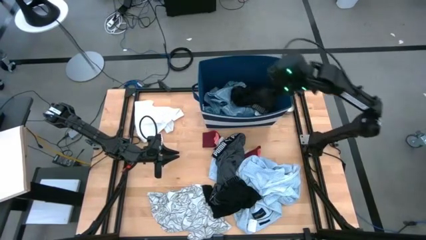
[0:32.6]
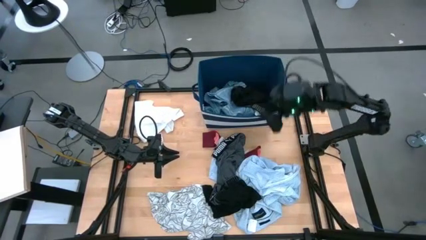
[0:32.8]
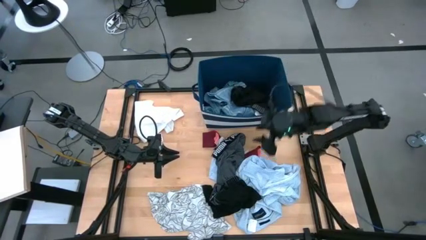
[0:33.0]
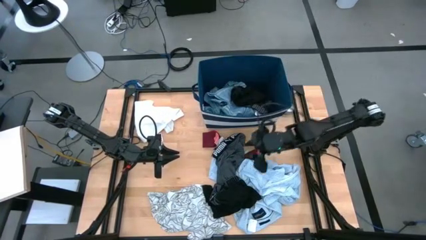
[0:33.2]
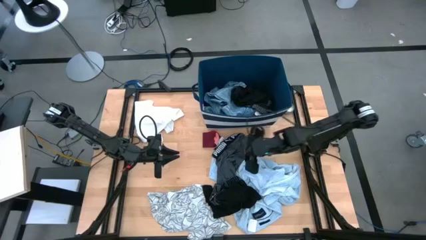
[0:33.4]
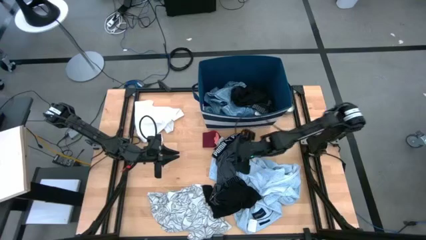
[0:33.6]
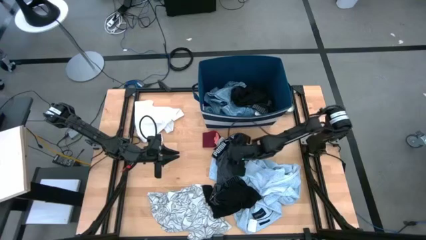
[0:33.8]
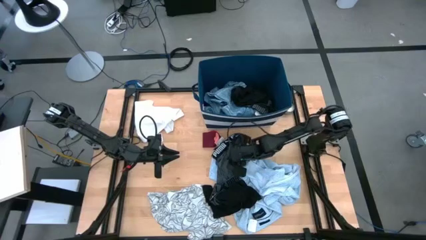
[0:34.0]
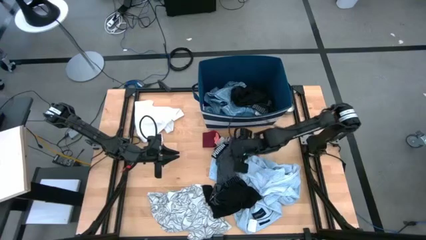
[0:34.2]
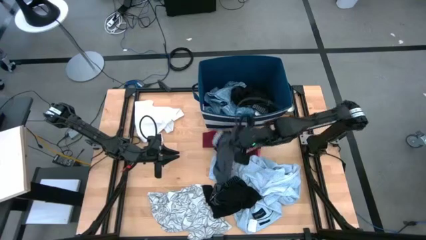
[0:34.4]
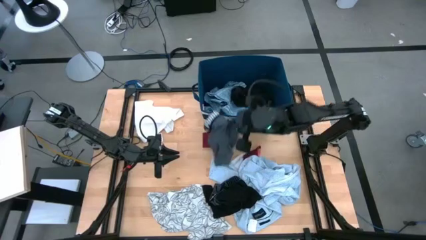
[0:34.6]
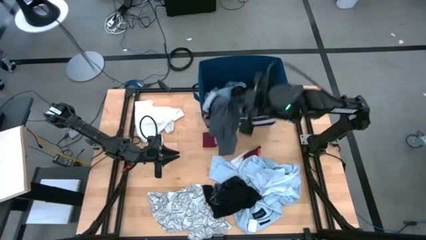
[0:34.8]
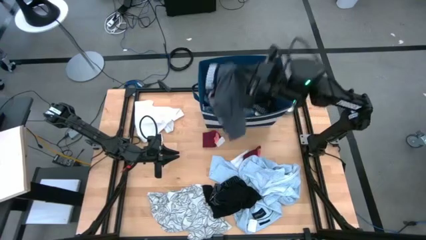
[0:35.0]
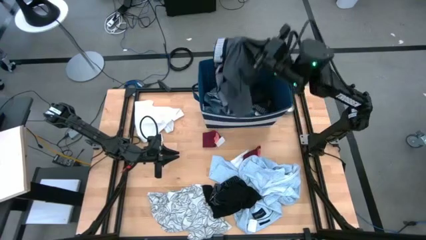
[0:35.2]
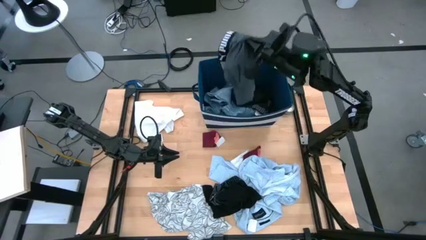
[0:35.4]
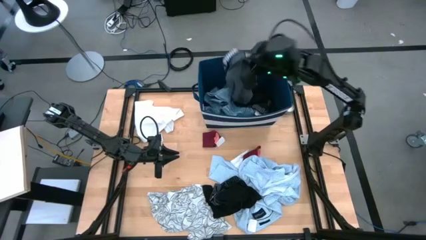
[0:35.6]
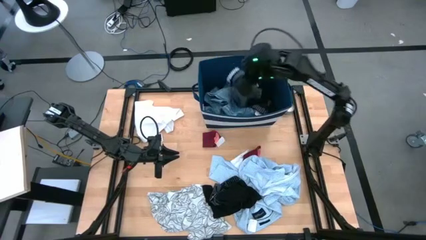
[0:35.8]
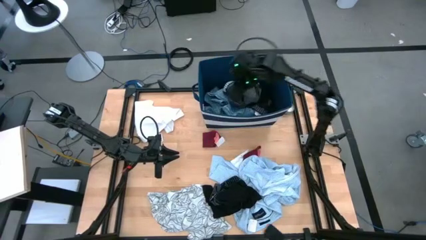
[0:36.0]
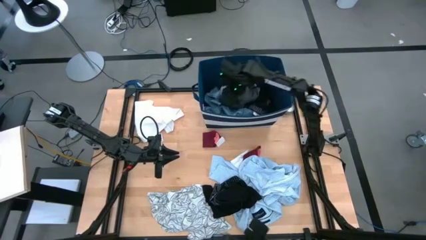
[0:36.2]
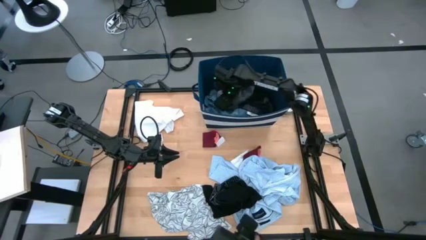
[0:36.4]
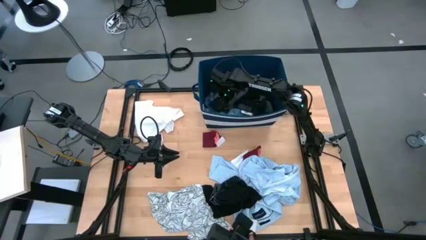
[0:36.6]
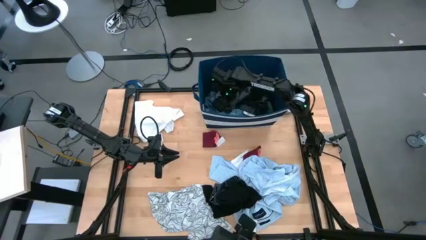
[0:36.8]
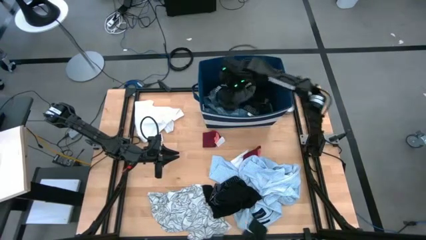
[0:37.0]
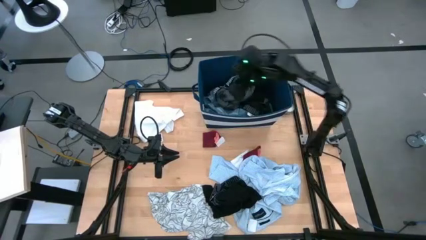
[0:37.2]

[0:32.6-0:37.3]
Task: Sort clothes
Put the gray boxer into the blue bin

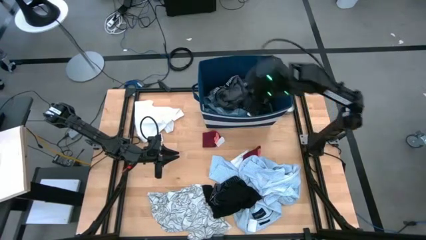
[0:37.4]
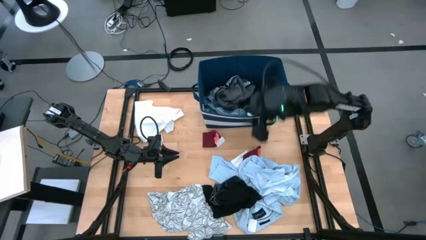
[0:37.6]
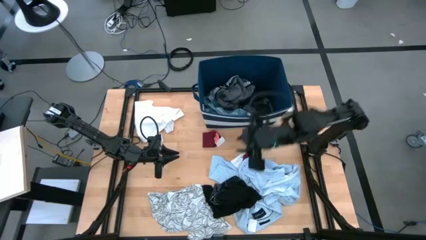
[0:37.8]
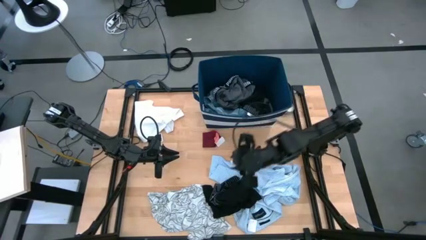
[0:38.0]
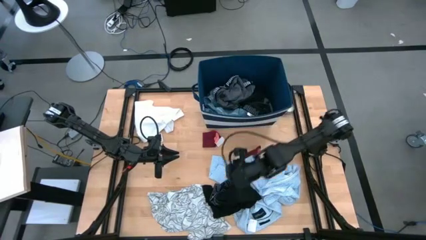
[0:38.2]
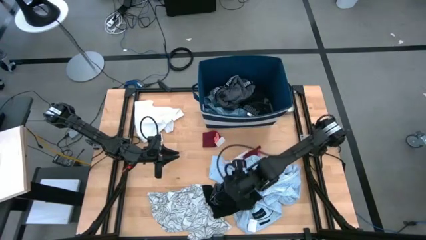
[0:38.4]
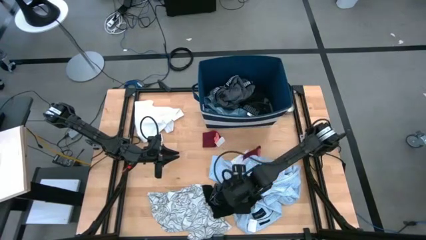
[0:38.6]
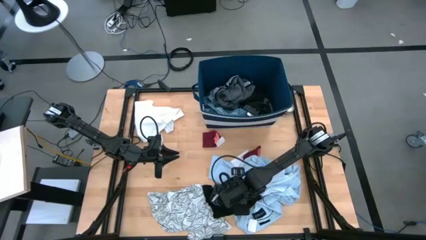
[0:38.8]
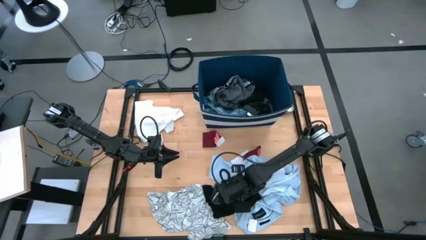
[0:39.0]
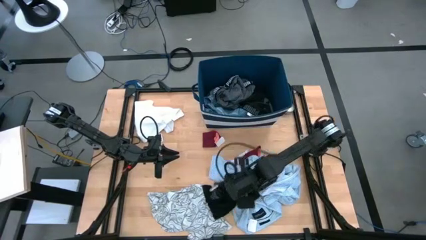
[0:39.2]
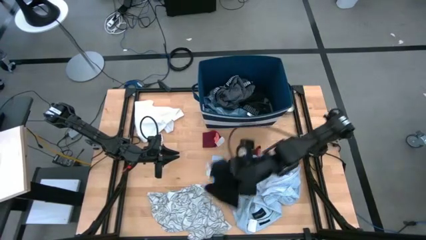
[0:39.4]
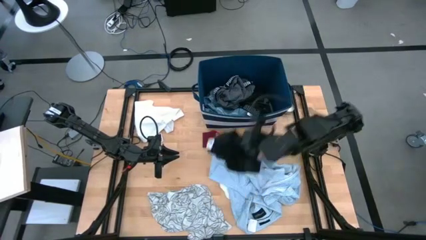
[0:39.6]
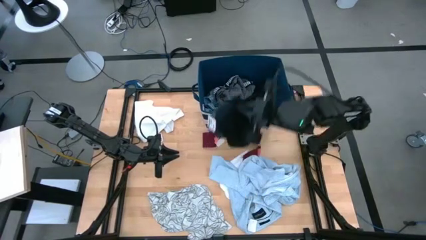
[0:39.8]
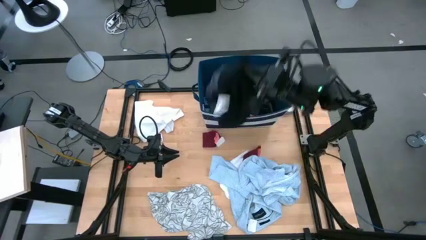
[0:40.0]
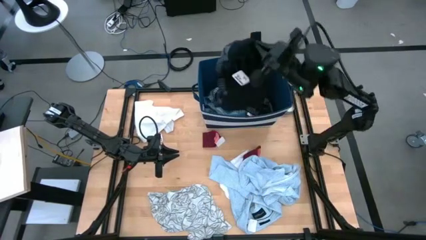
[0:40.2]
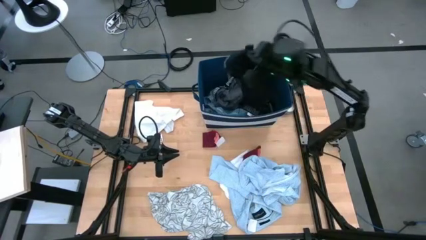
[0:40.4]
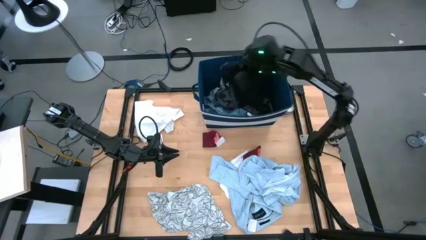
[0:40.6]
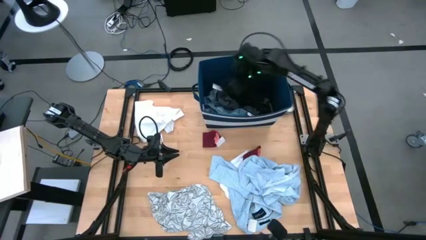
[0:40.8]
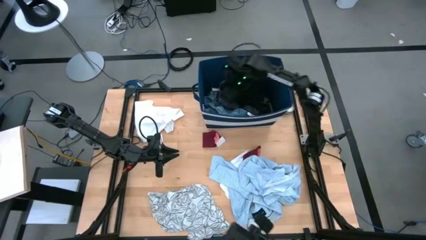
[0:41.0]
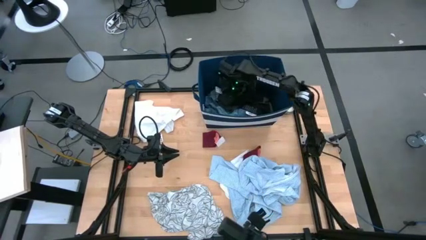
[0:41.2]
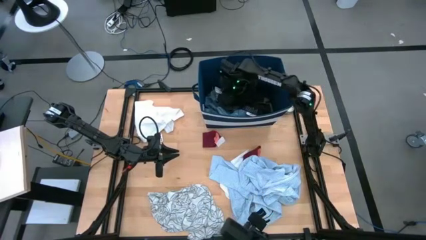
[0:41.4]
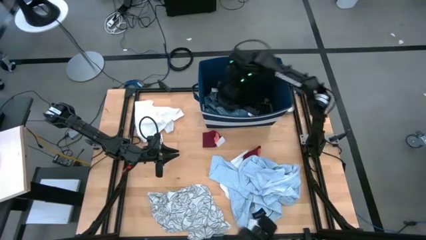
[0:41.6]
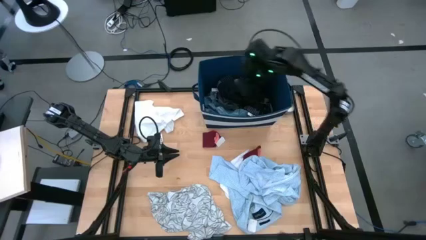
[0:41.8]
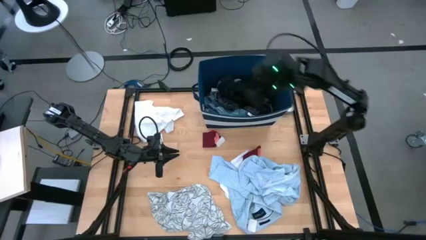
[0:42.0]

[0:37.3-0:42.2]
Put the black boxer into the blue bin

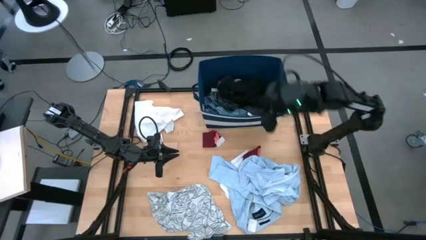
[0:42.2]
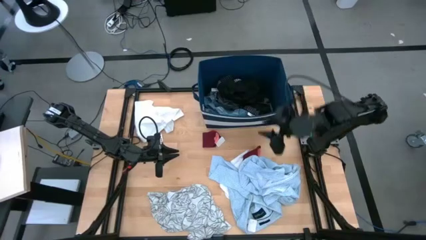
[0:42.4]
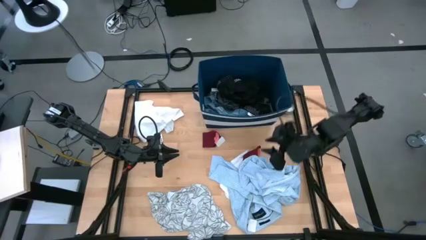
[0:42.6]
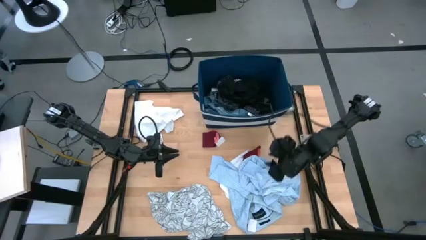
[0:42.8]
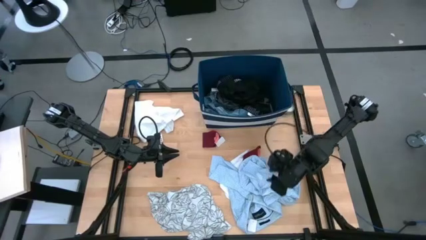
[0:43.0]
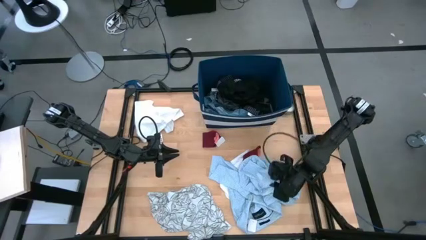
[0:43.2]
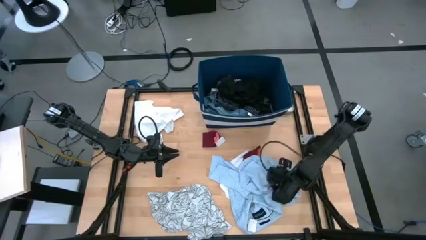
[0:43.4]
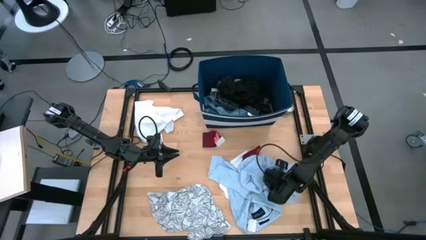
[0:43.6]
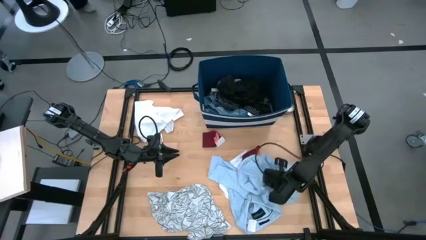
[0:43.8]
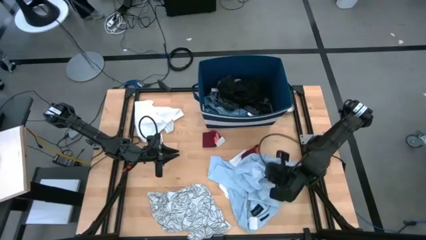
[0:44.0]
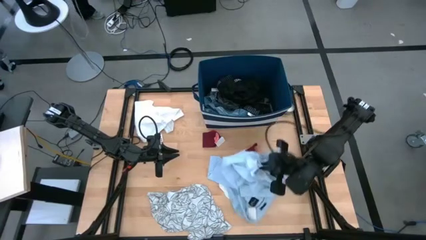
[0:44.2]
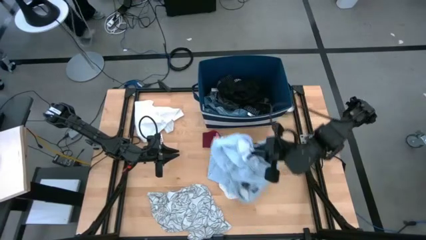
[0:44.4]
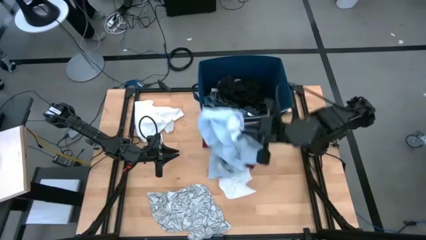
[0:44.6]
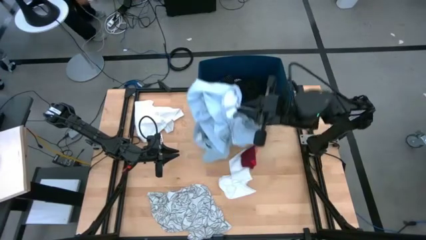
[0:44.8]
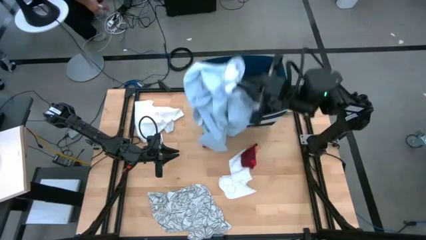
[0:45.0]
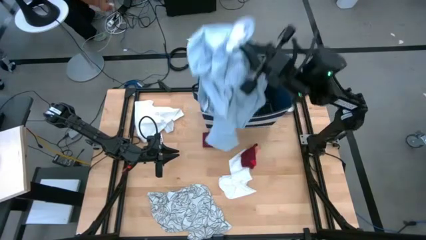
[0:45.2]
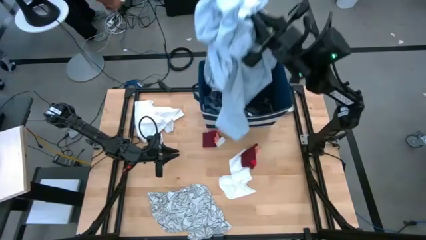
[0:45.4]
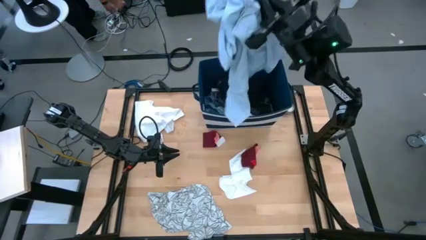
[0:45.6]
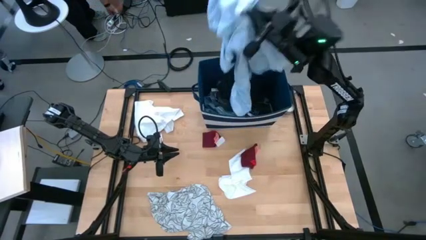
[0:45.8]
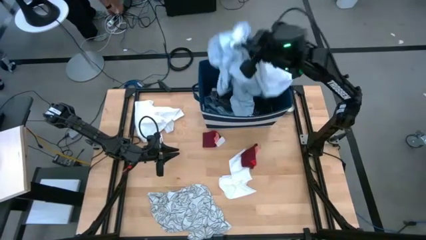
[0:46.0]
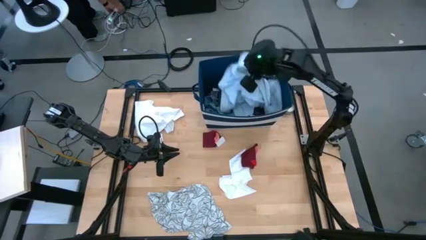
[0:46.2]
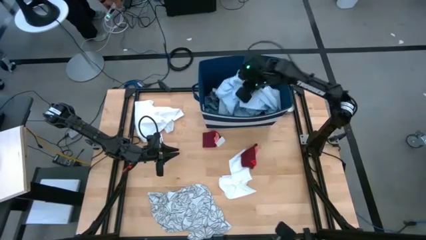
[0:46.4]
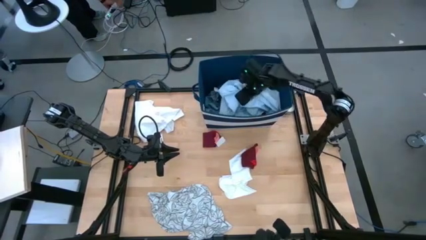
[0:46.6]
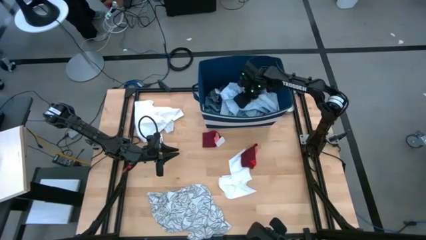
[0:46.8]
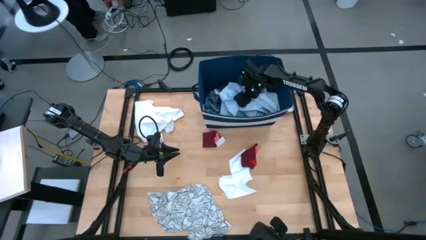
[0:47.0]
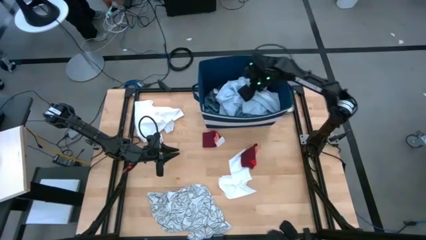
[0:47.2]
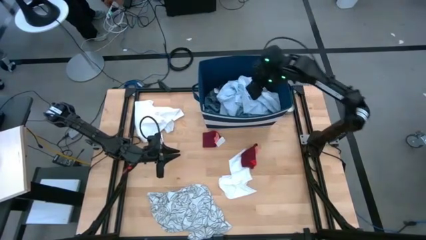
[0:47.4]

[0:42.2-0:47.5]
Put the white polo shirt into the blue bin
